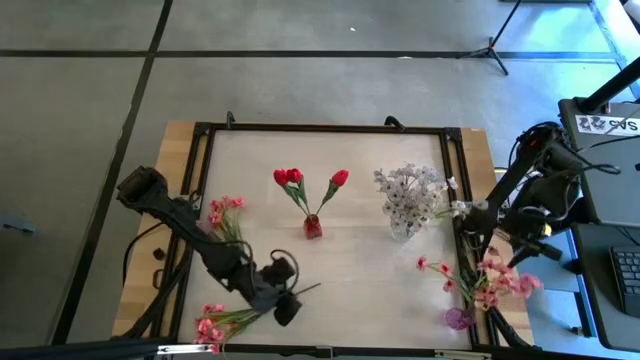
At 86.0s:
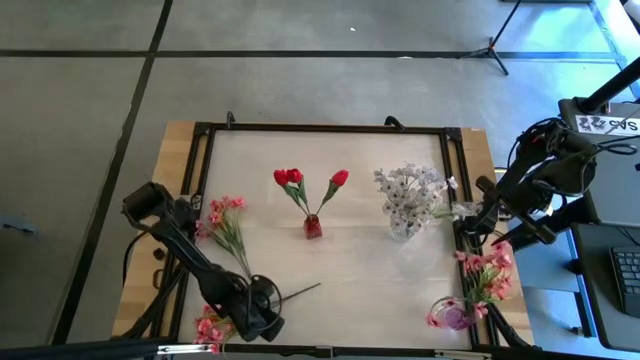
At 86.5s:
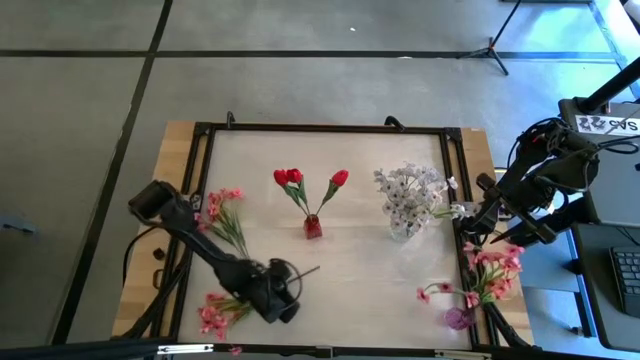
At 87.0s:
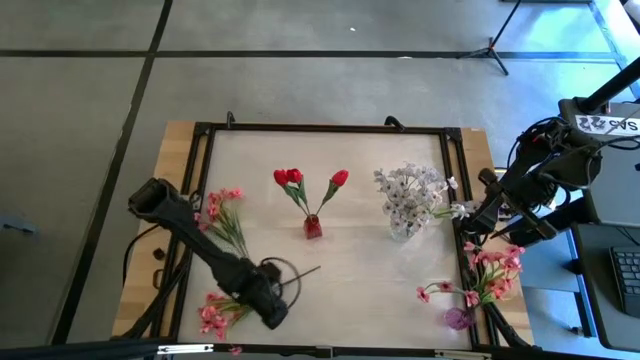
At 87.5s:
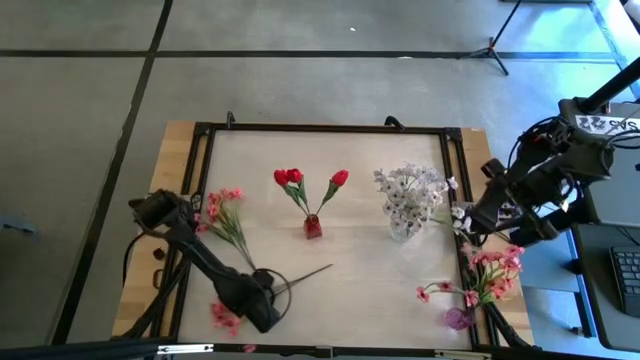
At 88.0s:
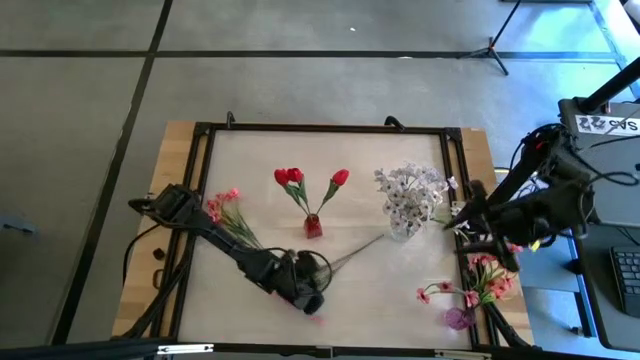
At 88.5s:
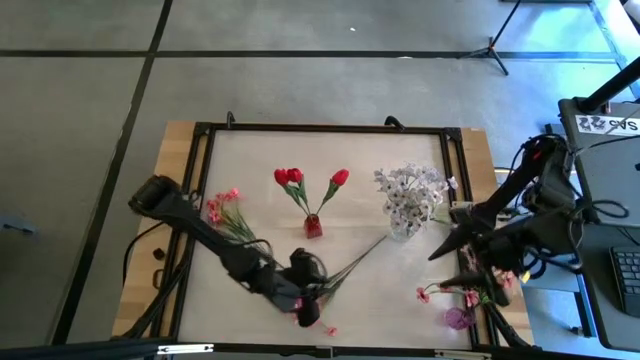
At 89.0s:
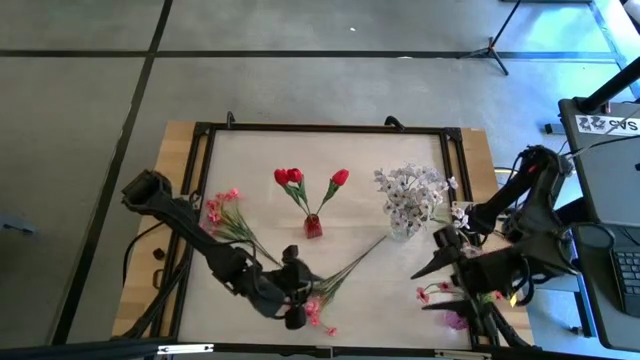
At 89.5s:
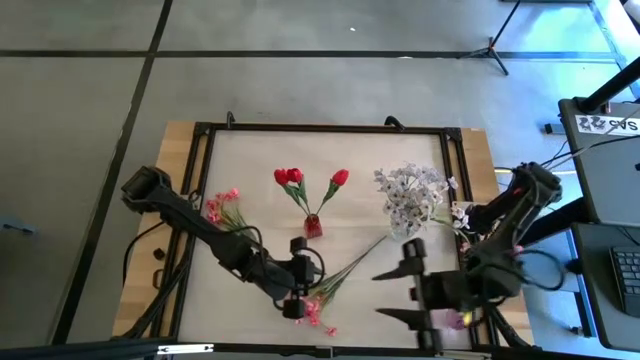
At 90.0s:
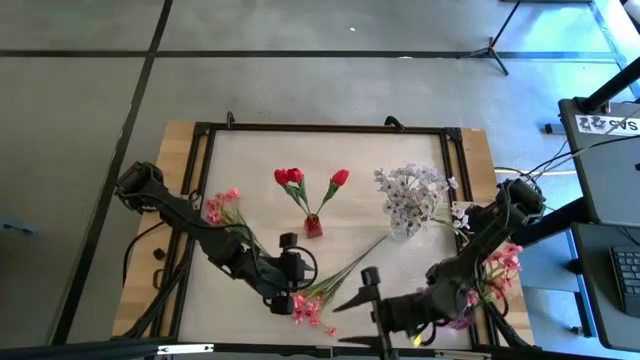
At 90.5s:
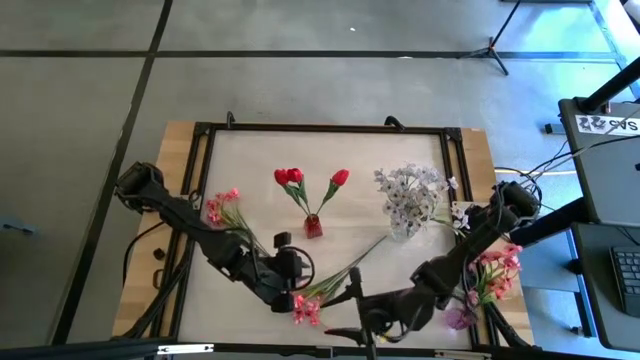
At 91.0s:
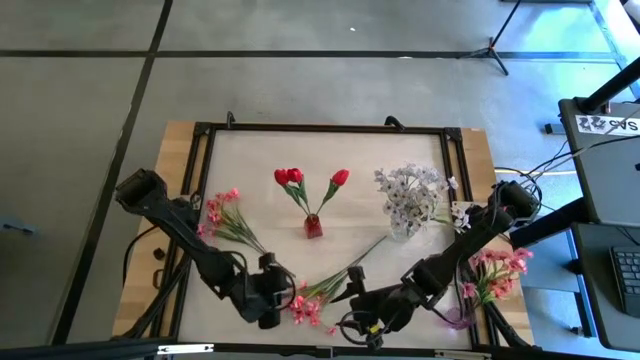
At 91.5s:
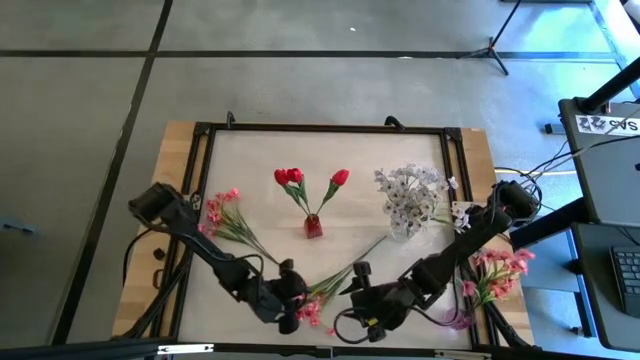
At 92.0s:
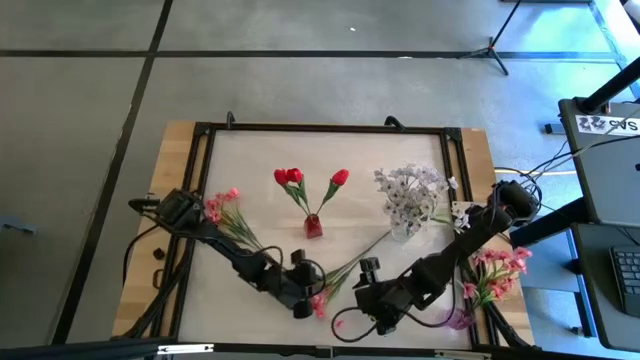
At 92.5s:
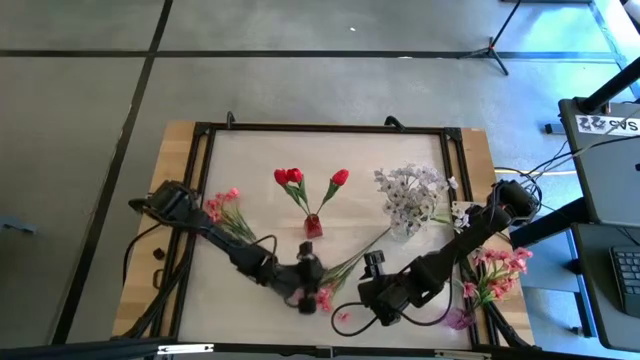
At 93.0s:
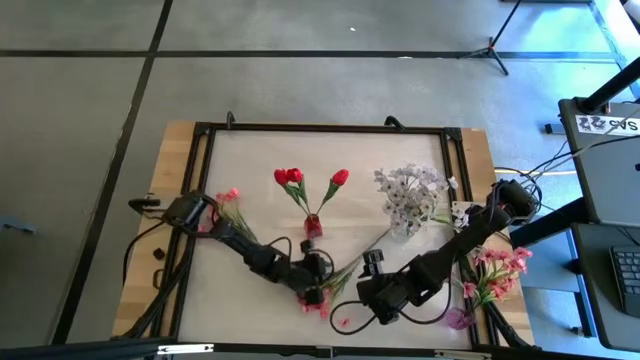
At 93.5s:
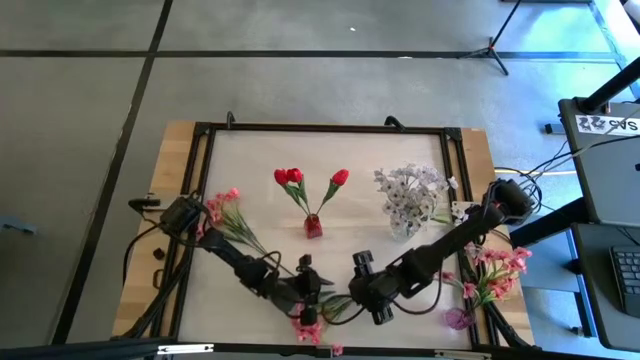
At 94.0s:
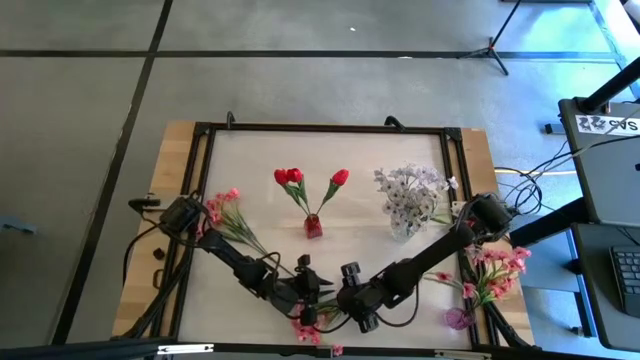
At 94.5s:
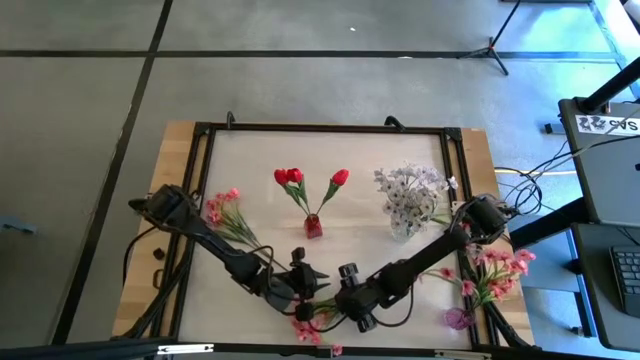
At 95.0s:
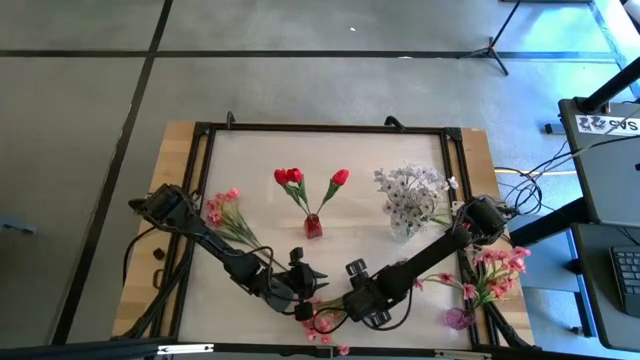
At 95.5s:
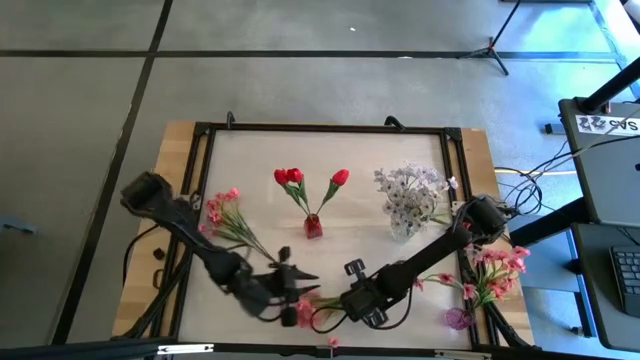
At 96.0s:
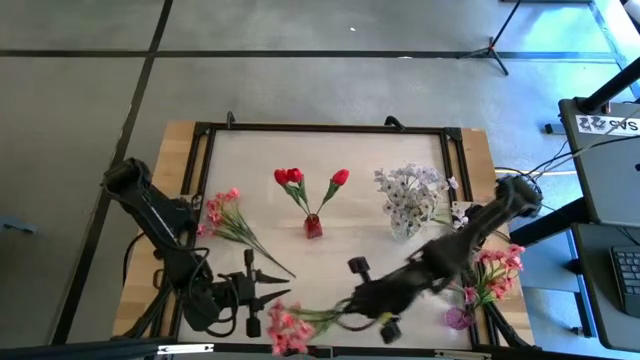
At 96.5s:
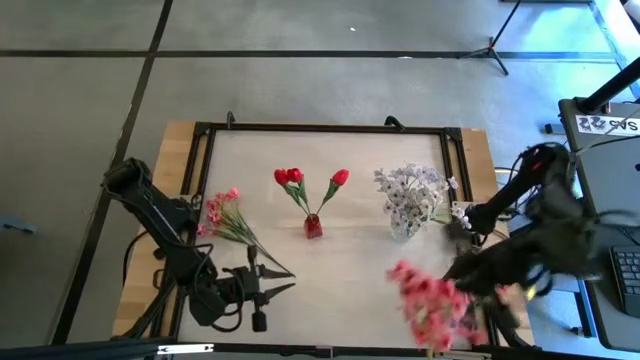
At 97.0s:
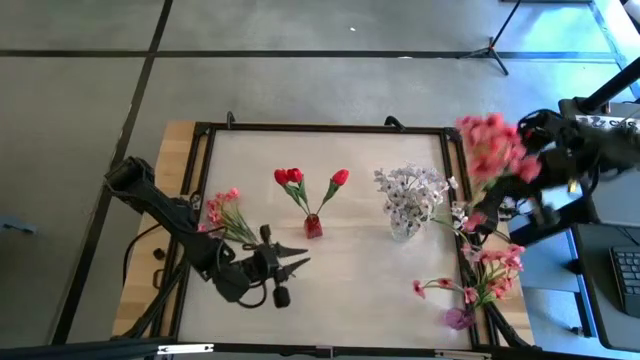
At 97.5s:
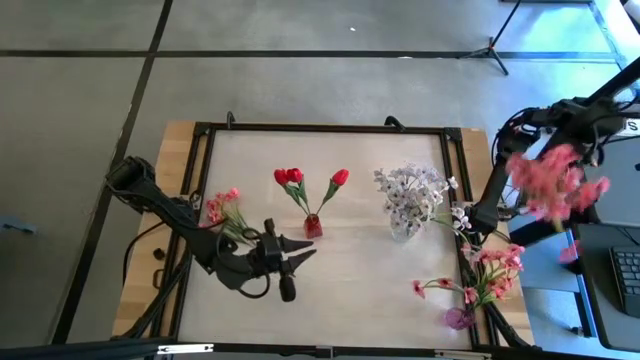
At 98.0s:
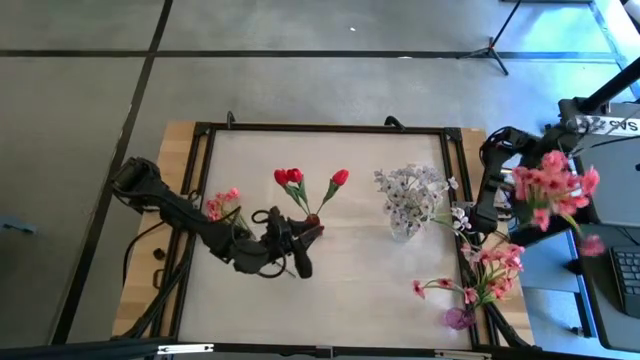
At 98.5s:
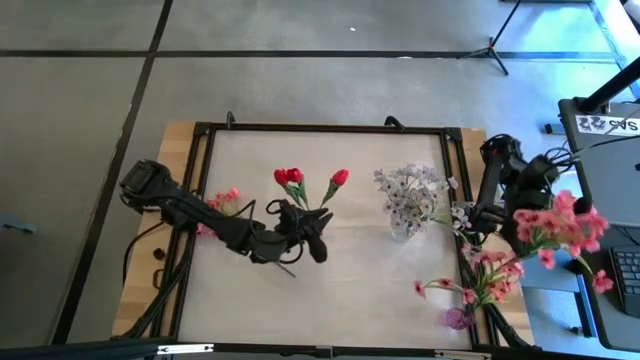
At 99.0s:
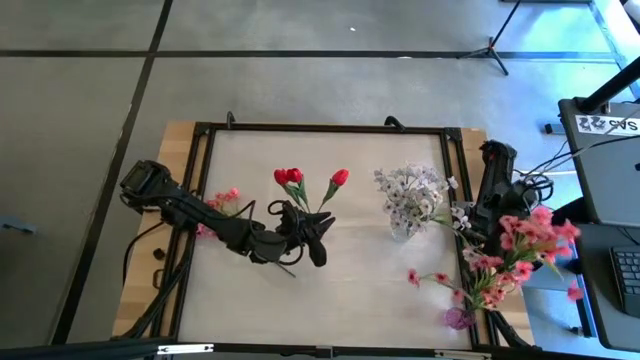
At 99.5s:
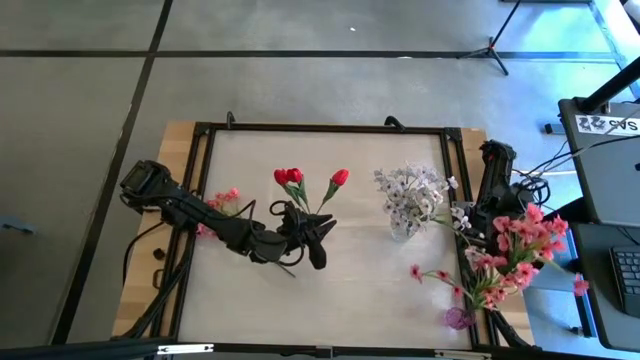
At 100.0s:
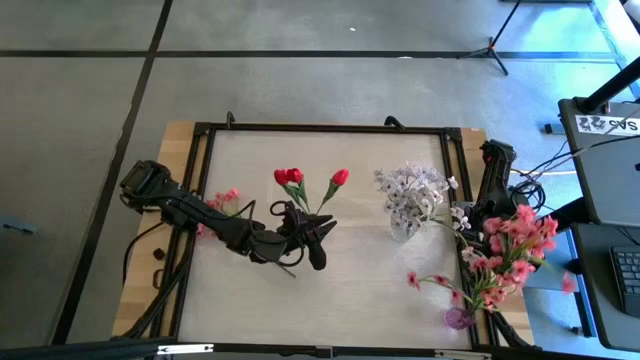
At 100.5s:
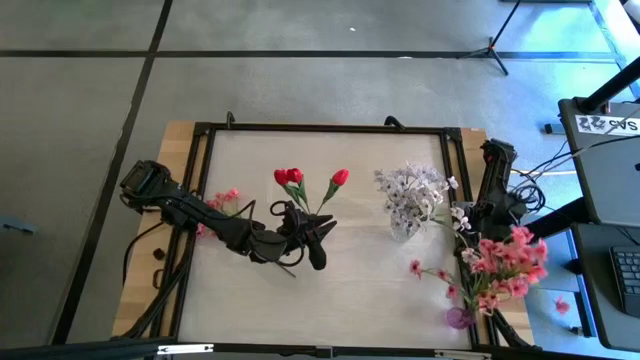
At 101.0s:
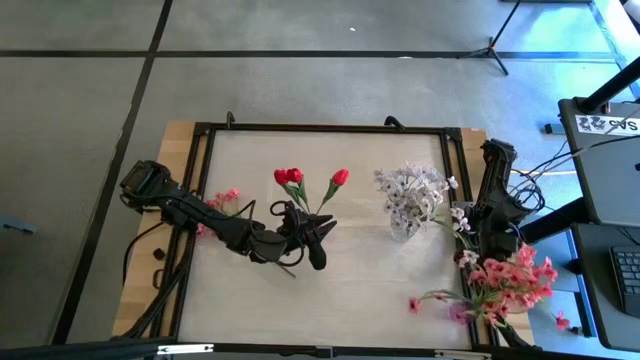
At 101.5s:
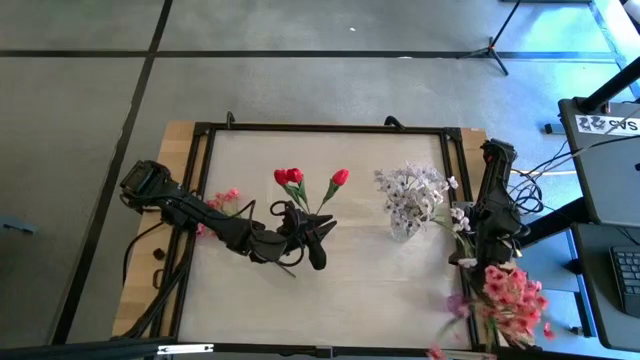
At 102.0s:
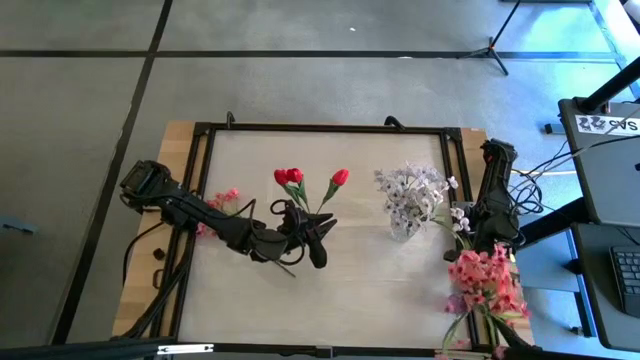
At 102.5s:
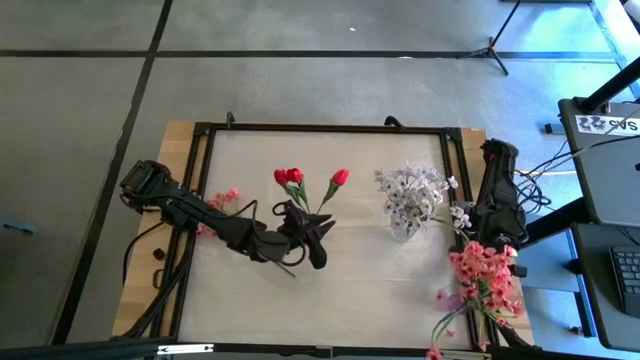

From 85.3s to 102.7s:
Task: Sort flowers into vase by color
Put the bottom pink flowers into the pink vase

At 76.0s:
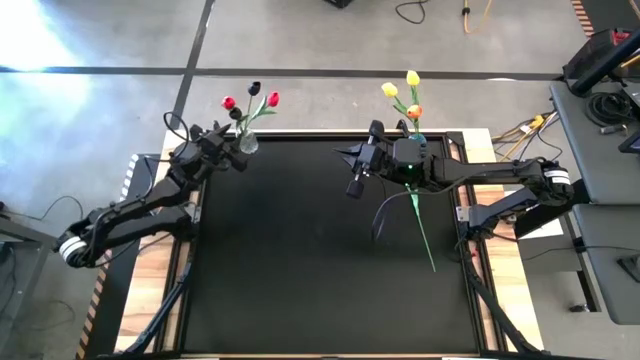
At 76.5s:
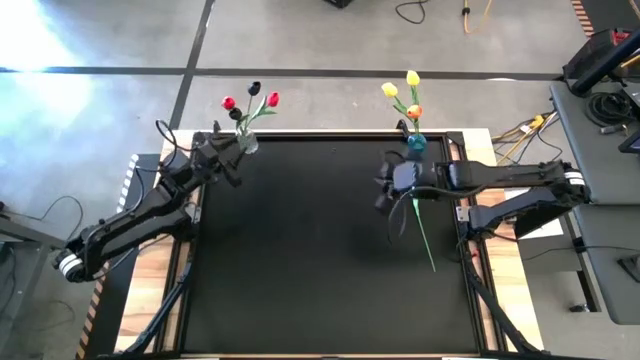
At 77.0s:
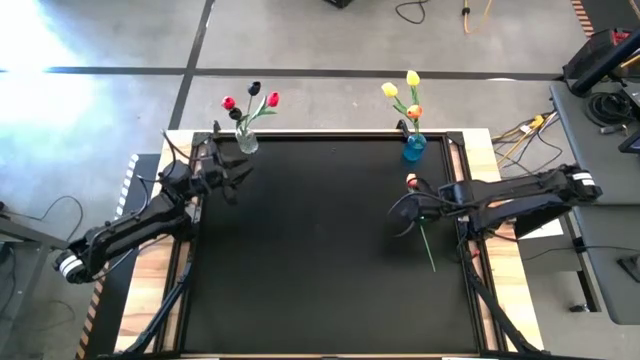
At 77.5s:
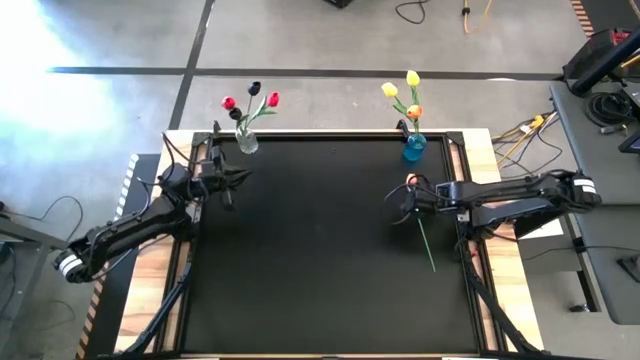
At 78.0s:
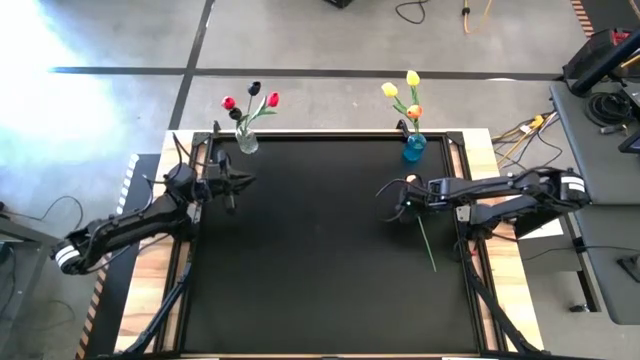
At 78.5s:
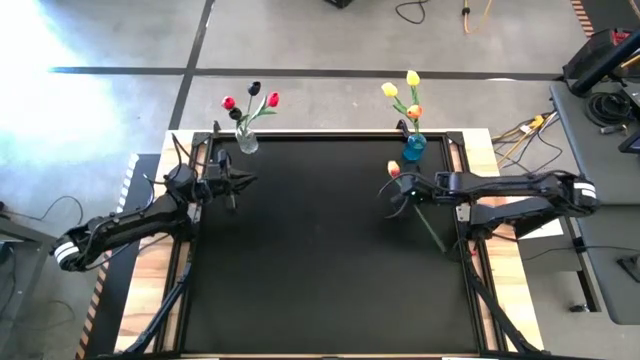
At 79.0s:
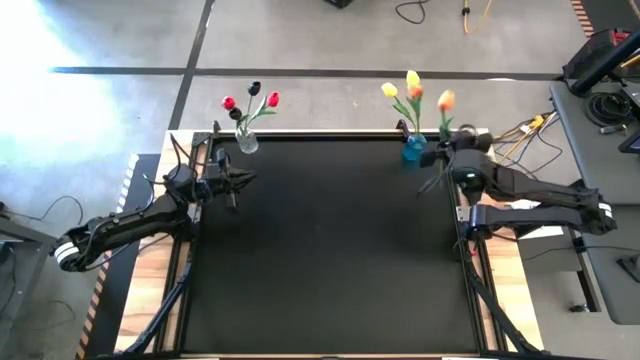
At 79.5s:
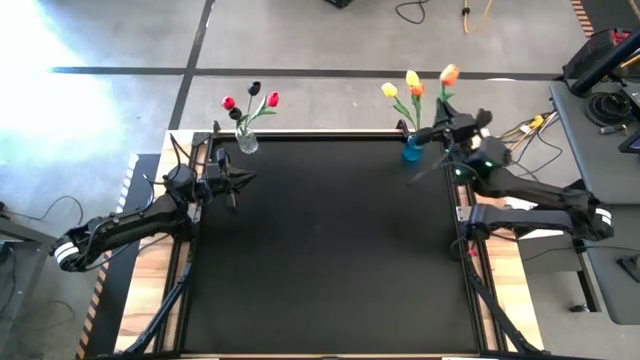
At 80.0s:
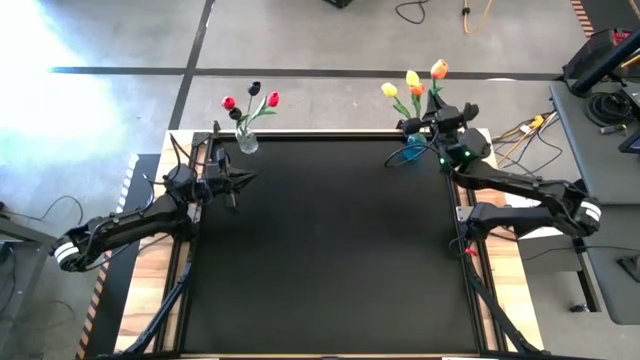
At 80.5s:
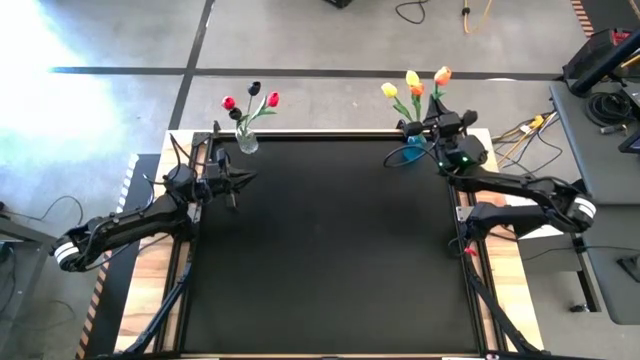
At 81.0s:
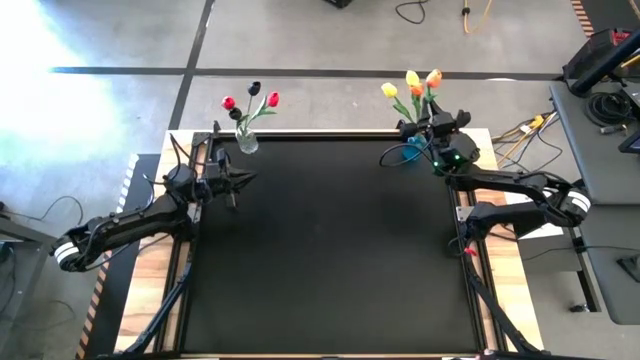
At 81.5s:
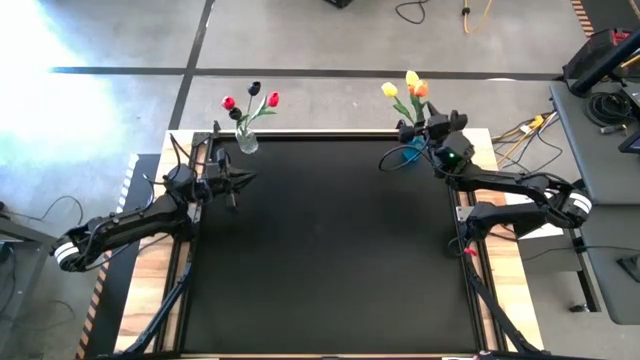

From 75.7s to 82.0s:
Task: Sort flowers into vase by color
Put the orange tulip into the blue flower vase
